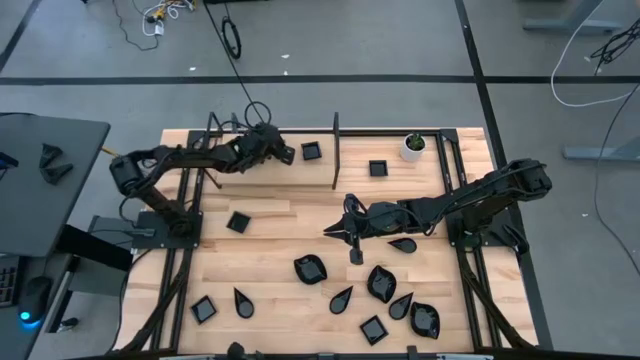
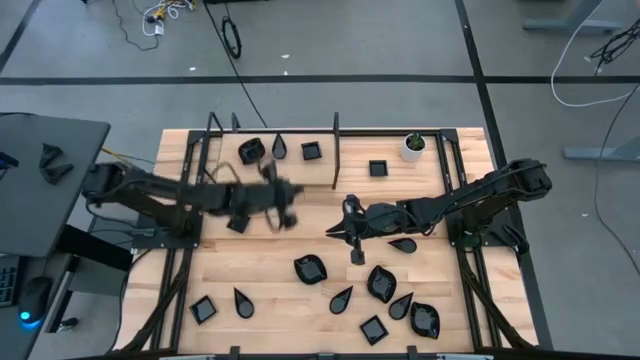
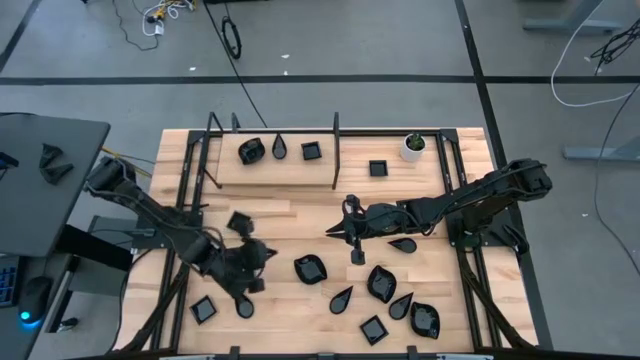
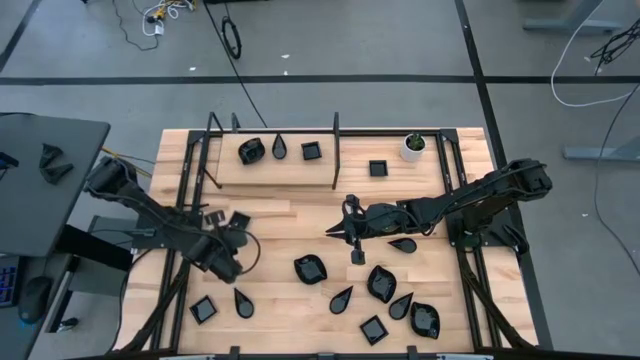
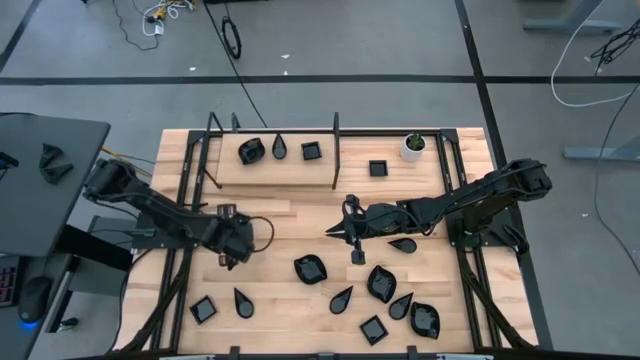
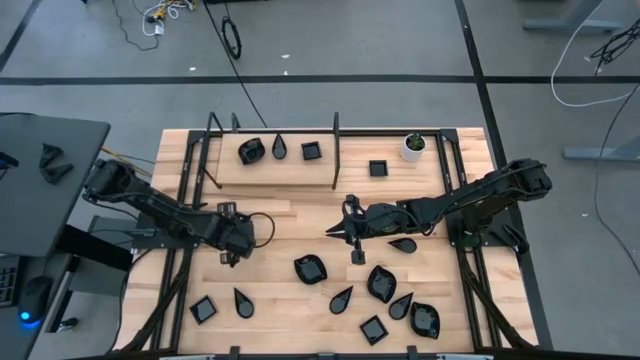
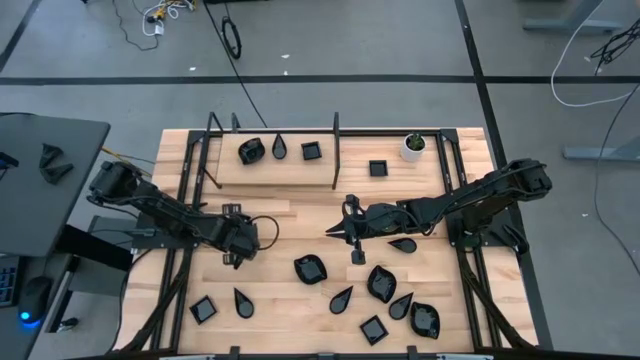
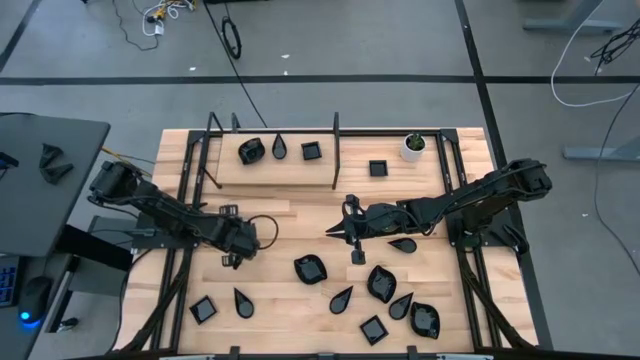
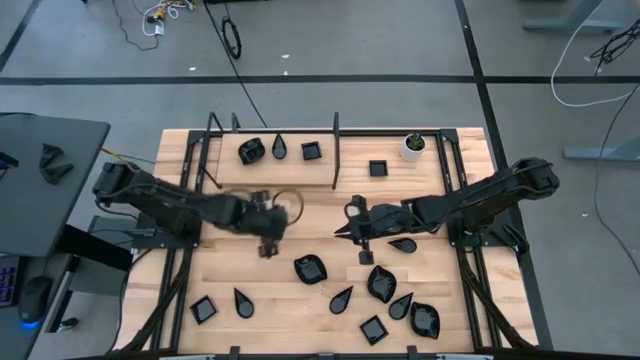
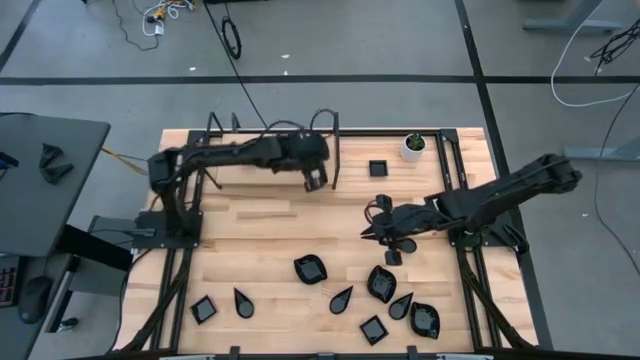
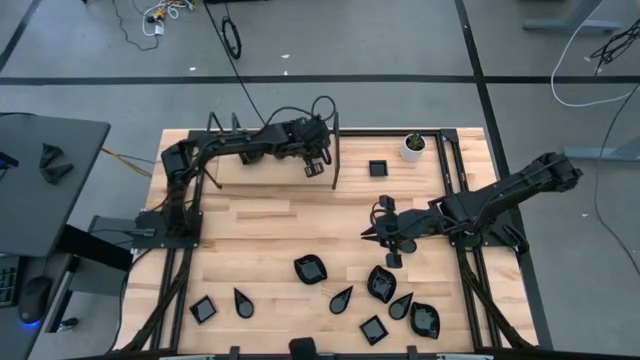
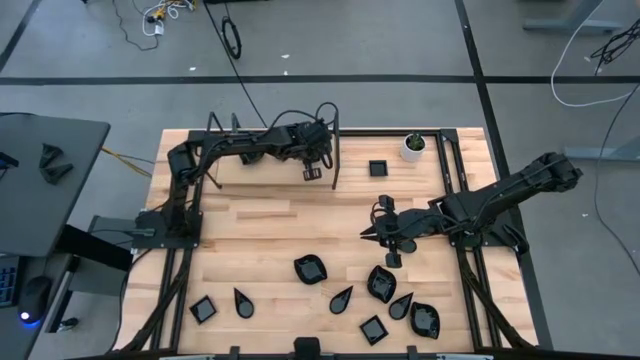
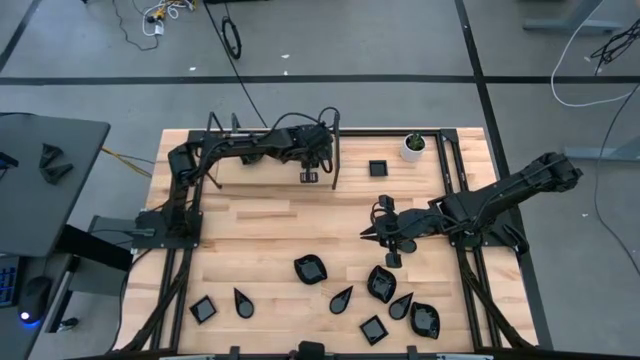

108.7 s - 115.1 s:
Task: Pick & Place Mini shaped plates
Stack the black square plate on top of the stacked black square plates on the shelf

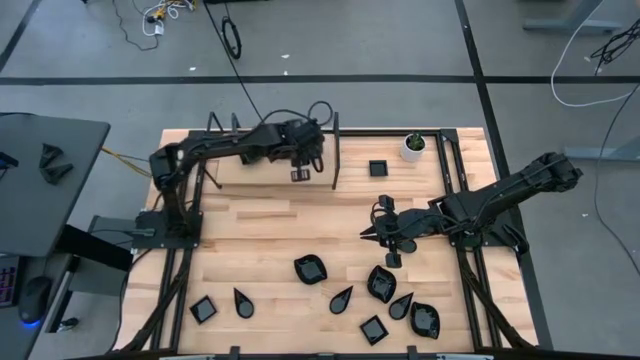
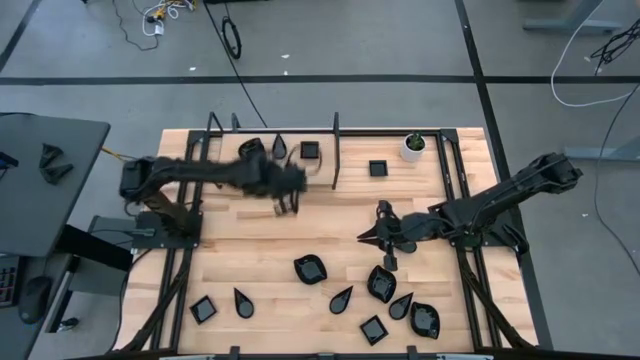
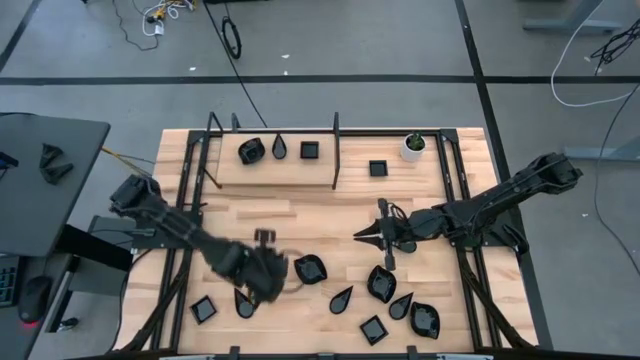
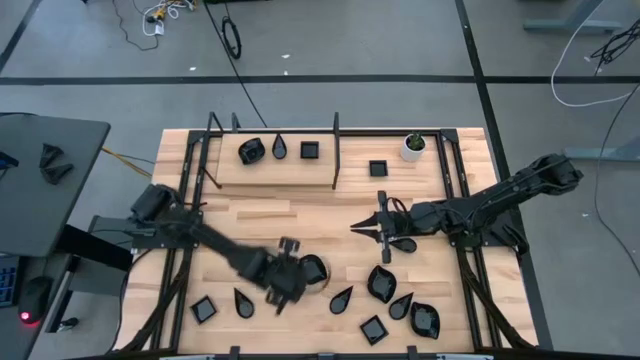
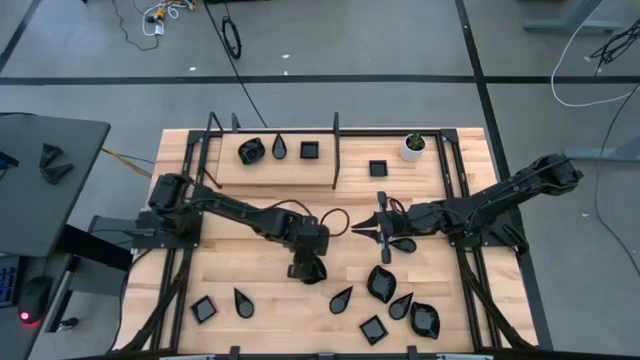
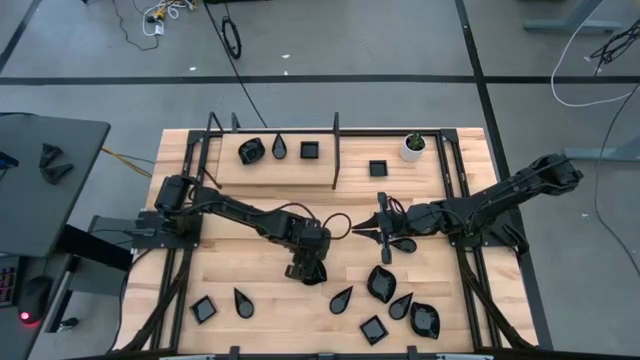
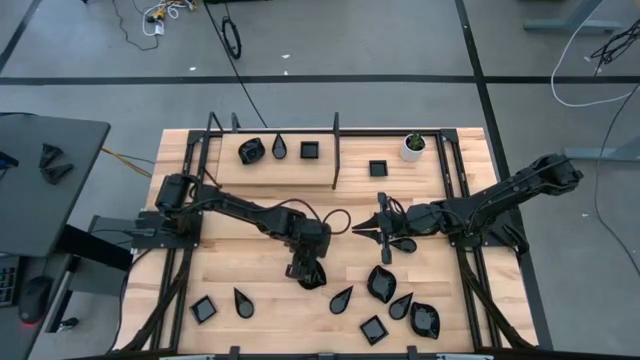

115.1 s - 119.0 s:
Stack the black leaf-shaped plate on top of the stacked black leaf-shaped plates on the shelf

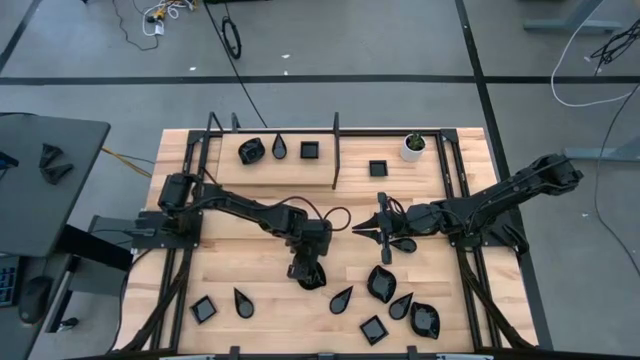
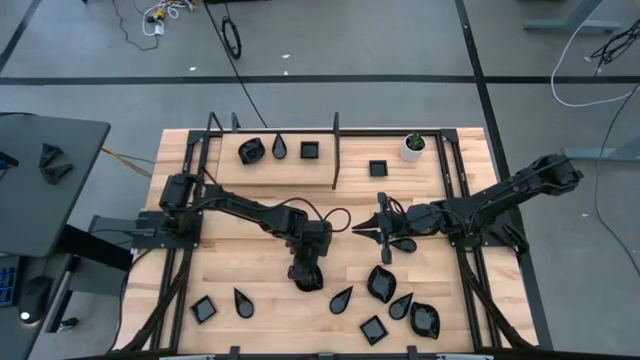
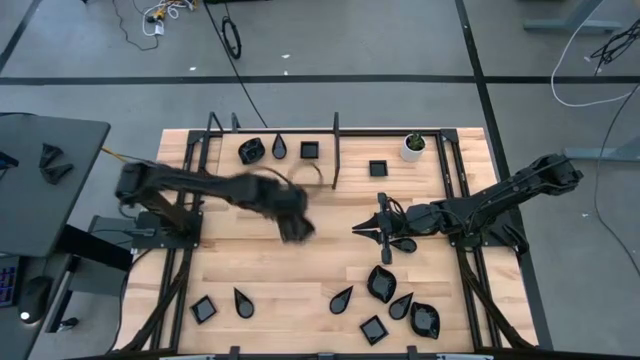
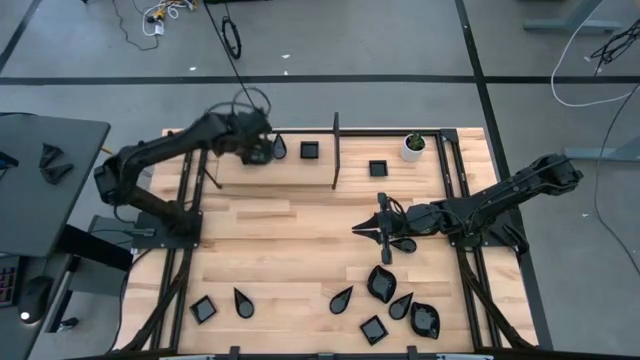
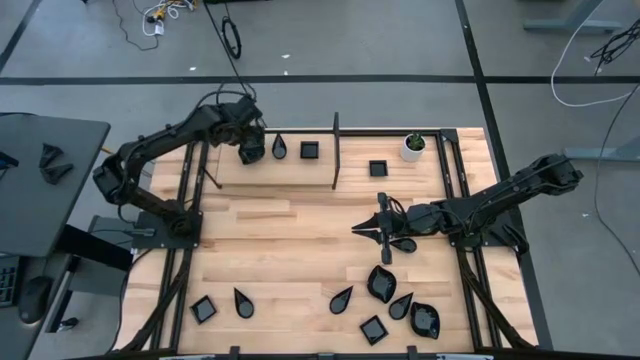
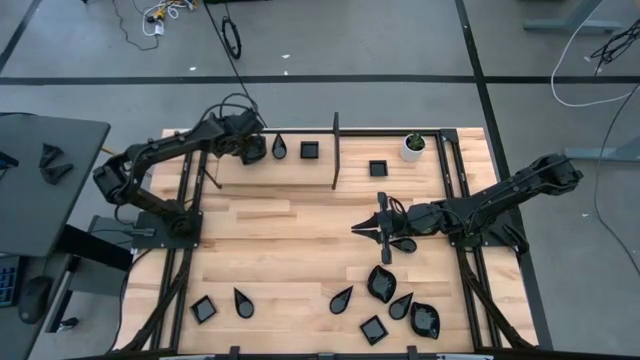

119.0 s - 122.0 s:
Stack the black leaf-shaped plate on top of the stacked black leaf-shaped plates on the shelf

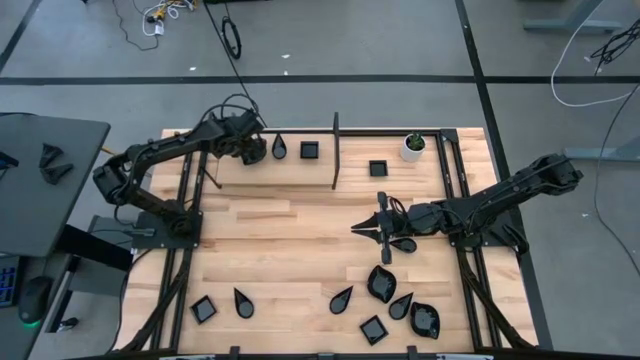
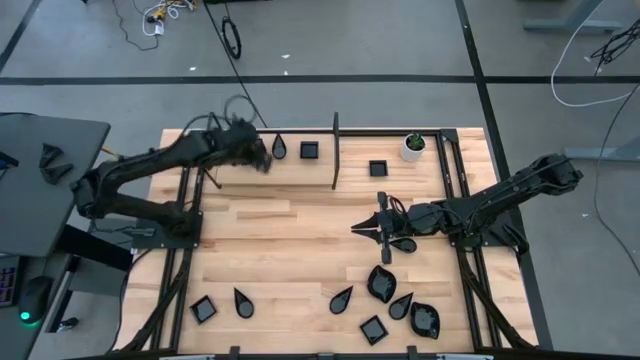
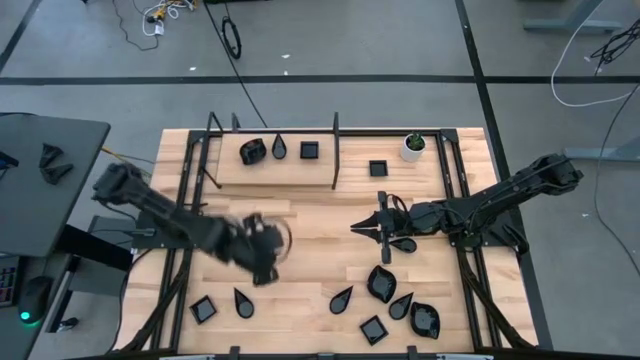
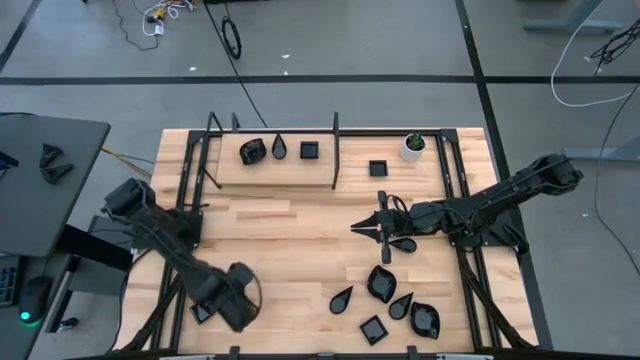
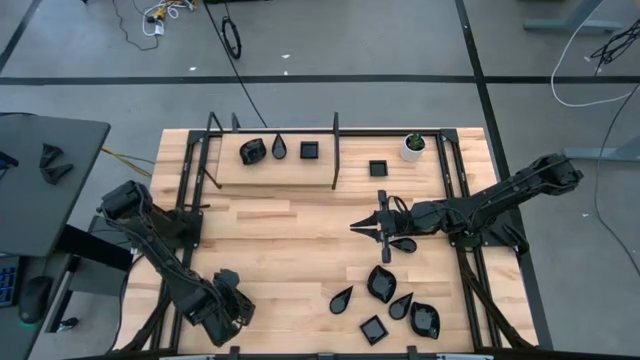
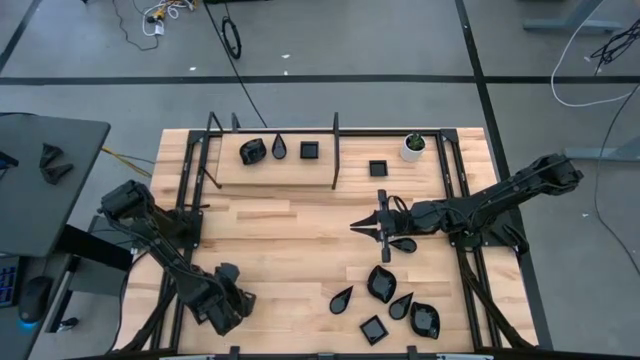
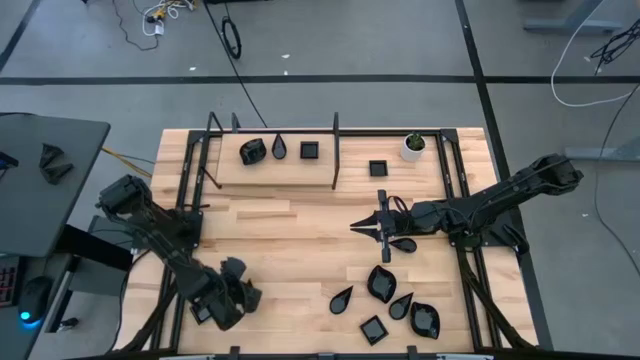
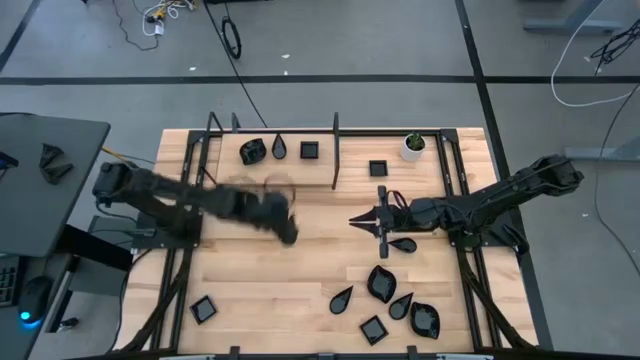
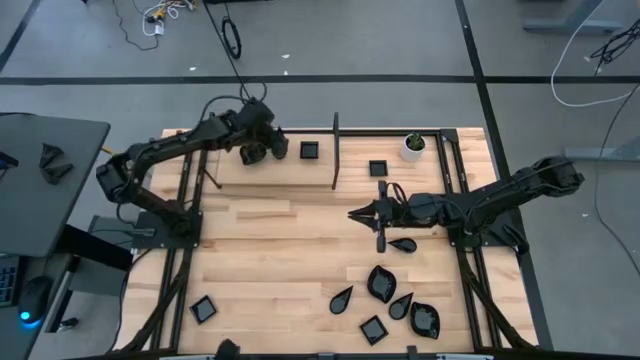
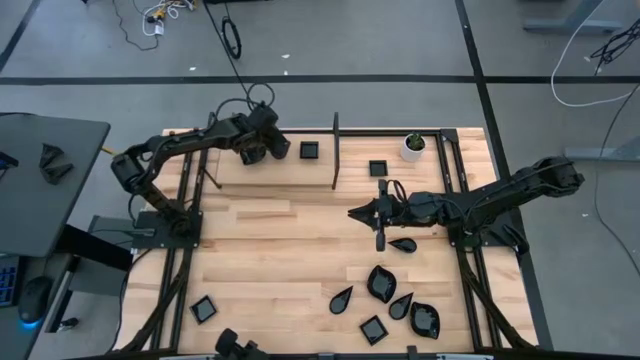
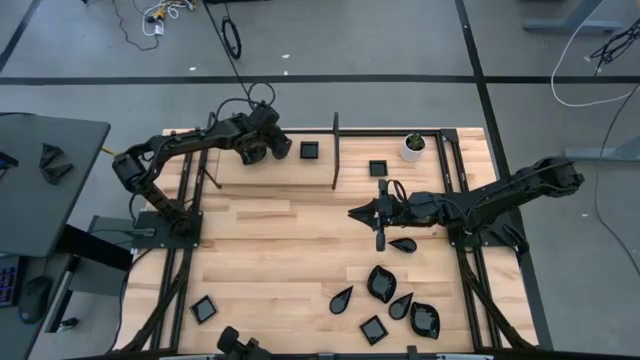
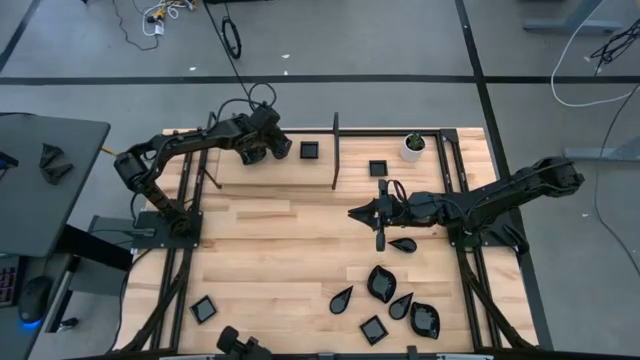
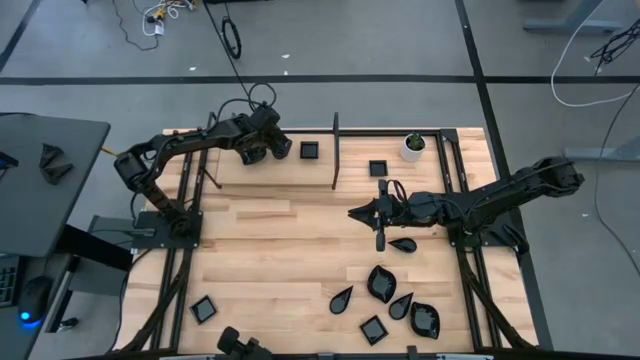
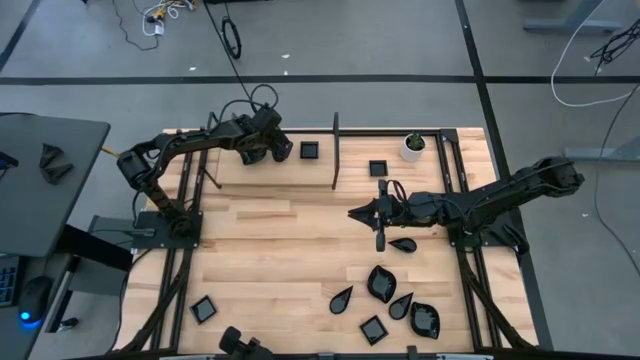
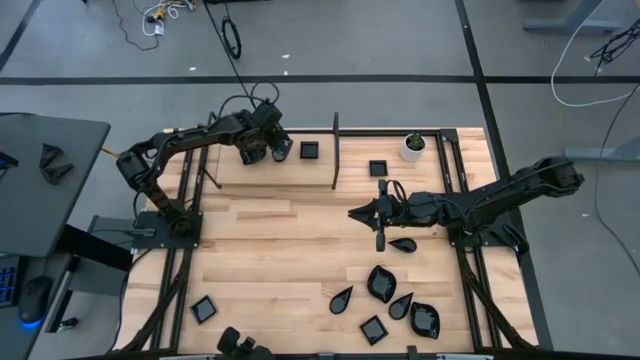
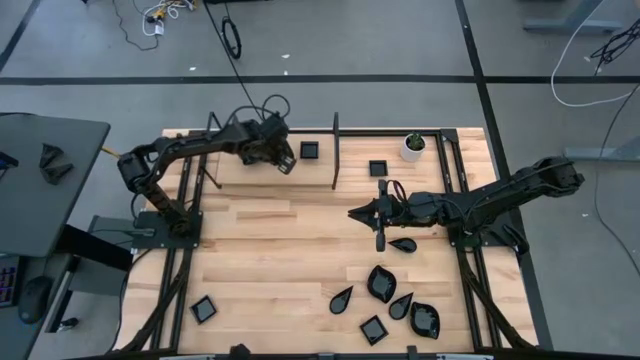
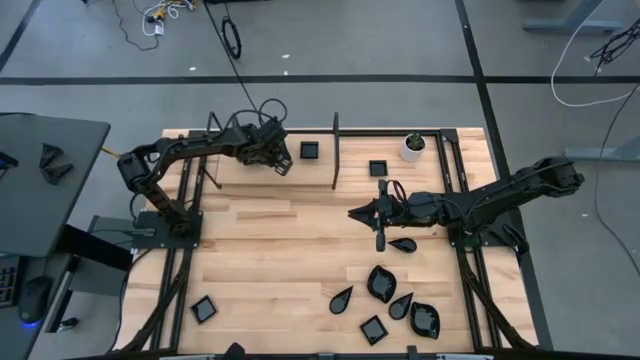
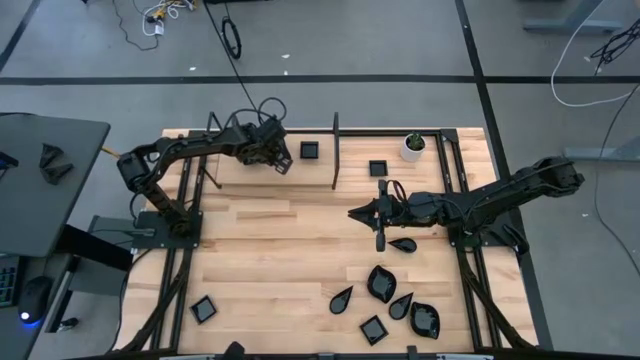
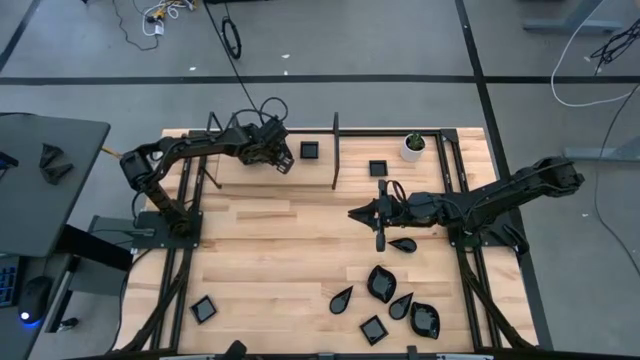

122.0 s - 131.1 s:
Stack the black drop-shaped plate on top of the stacked black drop-shaped plates on the shelf
